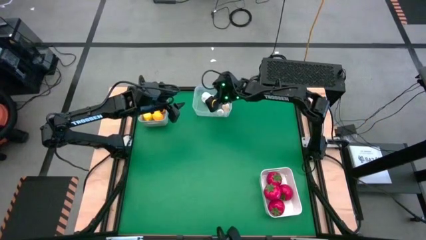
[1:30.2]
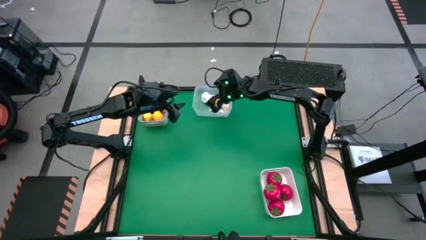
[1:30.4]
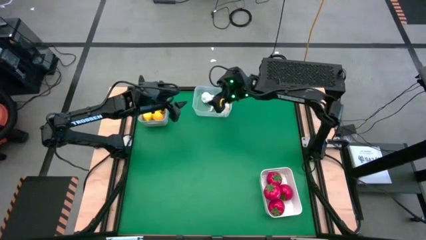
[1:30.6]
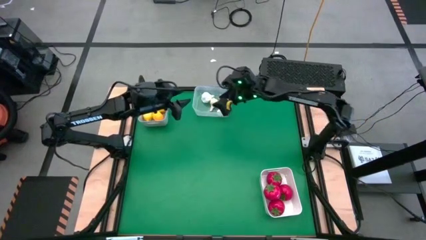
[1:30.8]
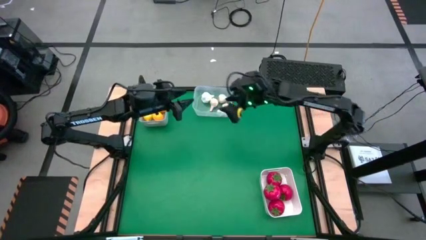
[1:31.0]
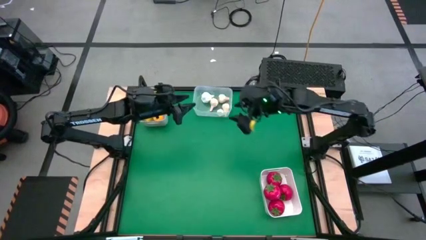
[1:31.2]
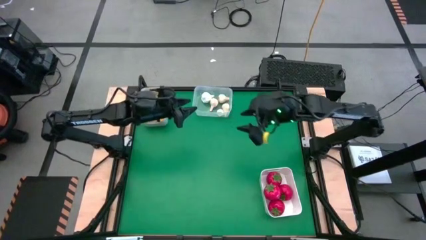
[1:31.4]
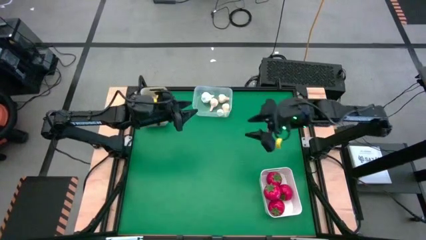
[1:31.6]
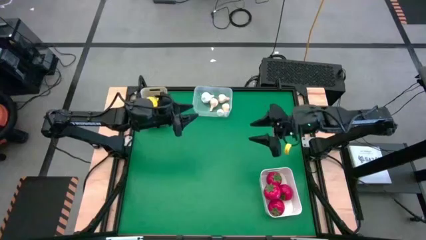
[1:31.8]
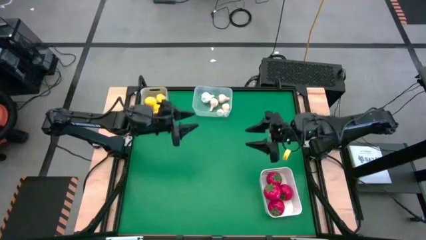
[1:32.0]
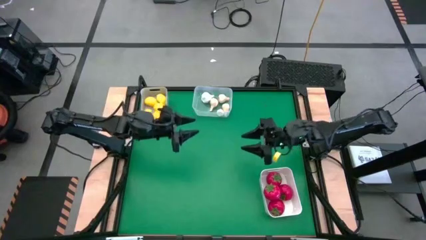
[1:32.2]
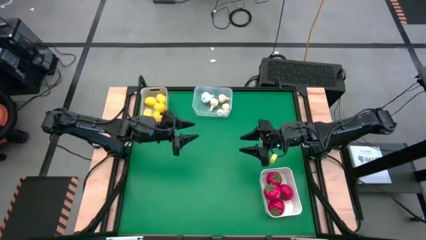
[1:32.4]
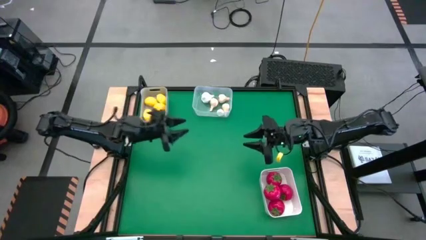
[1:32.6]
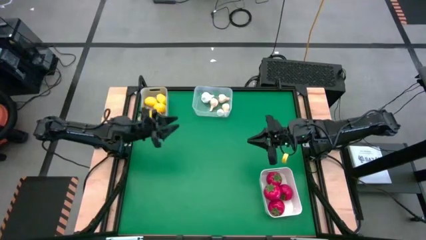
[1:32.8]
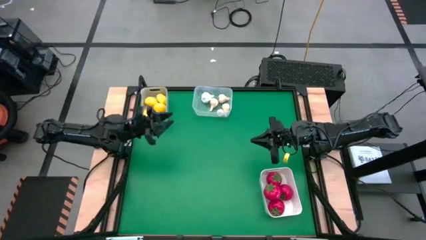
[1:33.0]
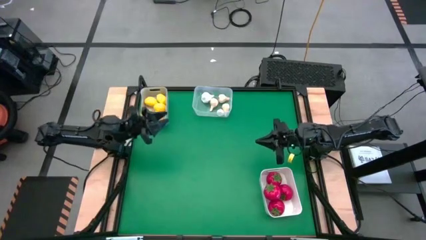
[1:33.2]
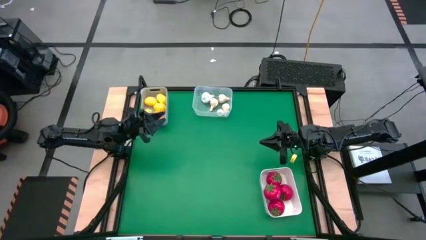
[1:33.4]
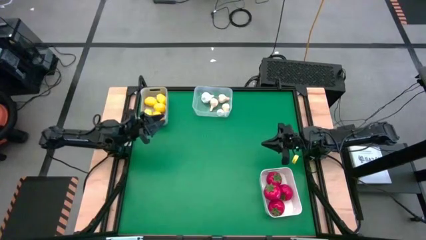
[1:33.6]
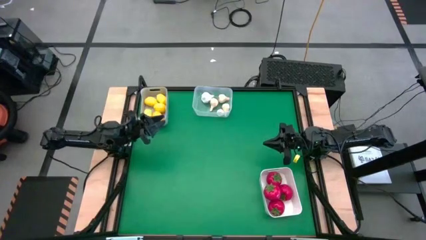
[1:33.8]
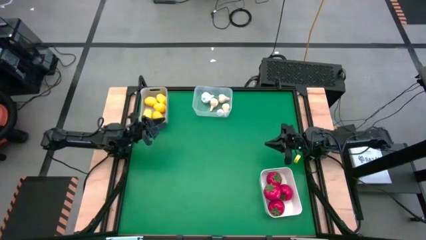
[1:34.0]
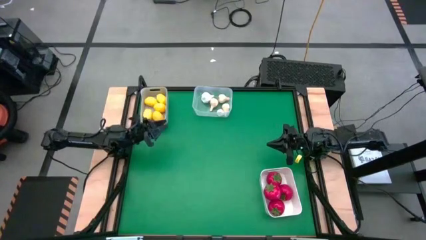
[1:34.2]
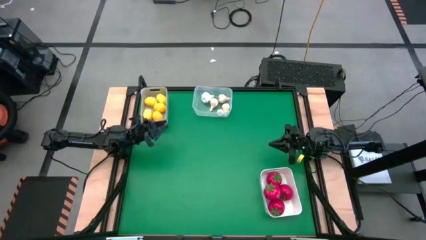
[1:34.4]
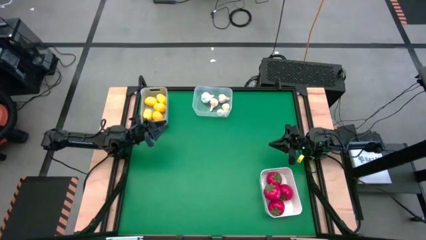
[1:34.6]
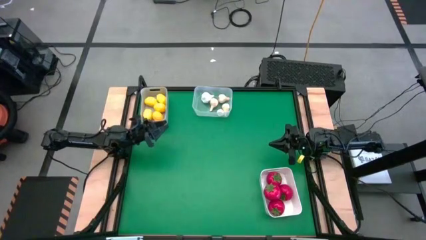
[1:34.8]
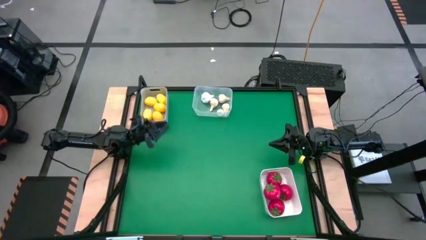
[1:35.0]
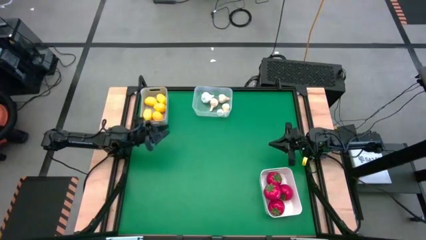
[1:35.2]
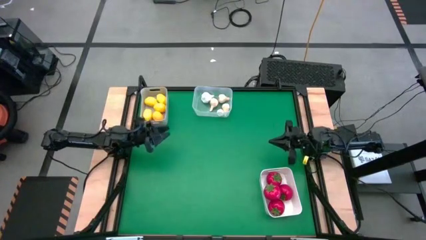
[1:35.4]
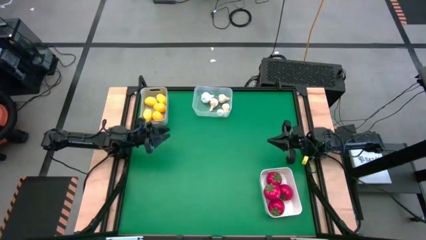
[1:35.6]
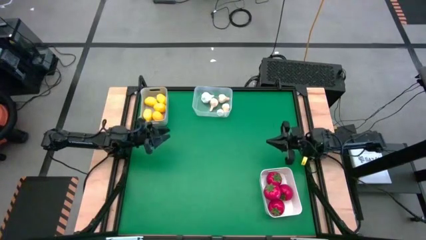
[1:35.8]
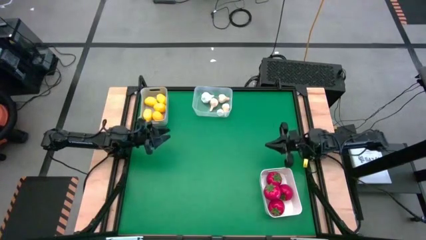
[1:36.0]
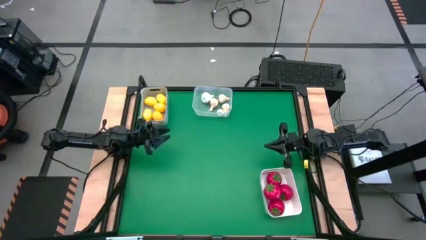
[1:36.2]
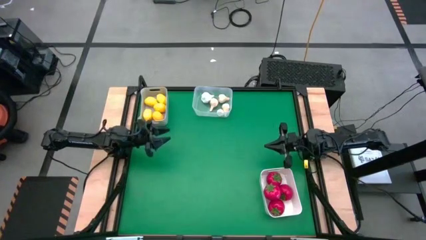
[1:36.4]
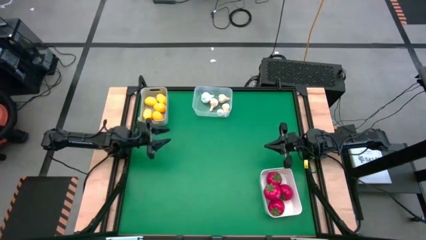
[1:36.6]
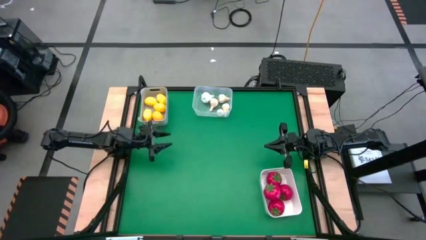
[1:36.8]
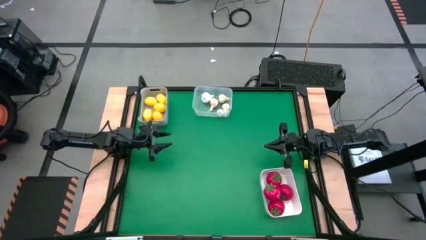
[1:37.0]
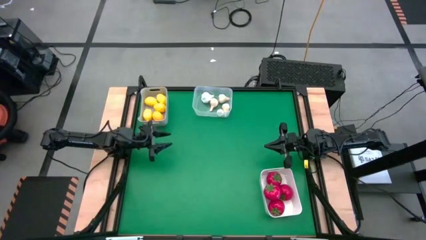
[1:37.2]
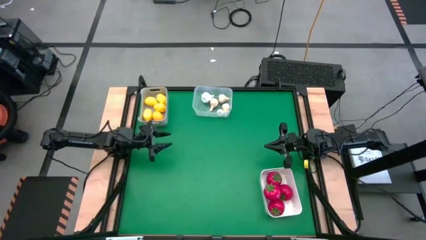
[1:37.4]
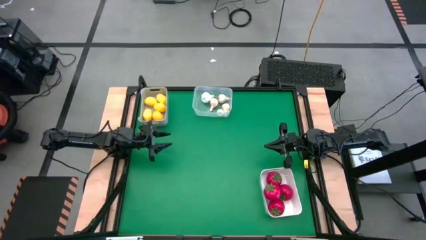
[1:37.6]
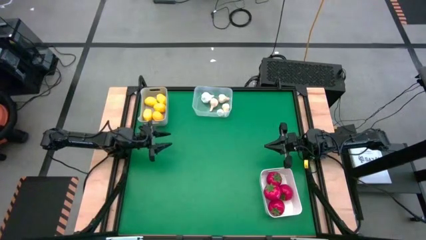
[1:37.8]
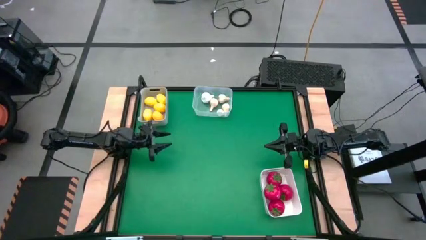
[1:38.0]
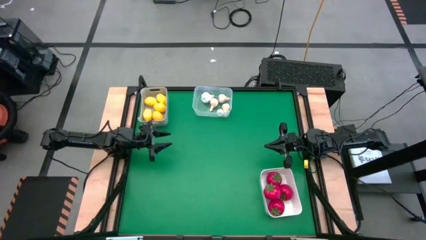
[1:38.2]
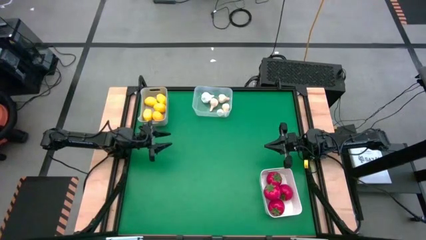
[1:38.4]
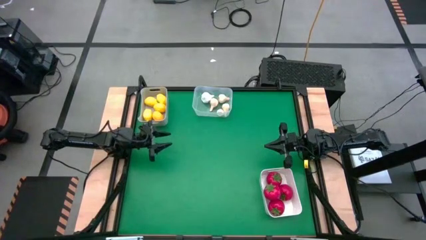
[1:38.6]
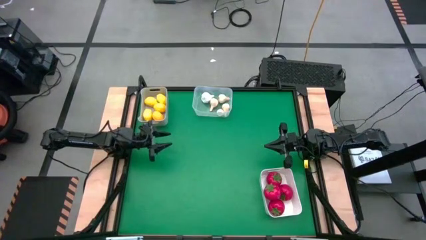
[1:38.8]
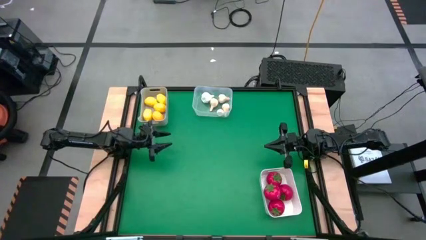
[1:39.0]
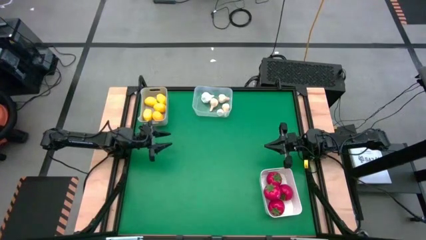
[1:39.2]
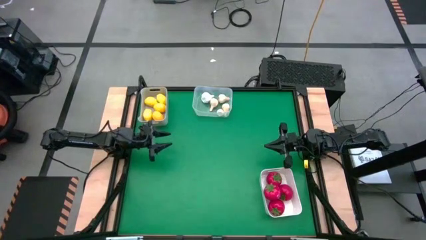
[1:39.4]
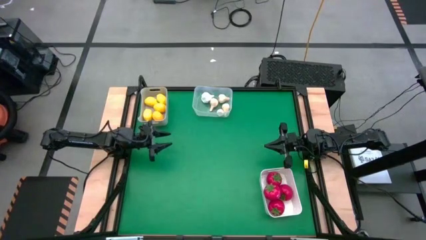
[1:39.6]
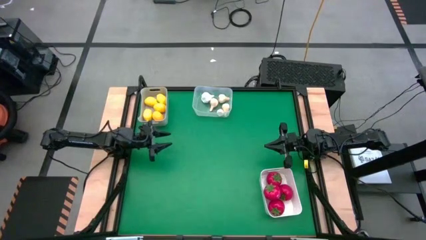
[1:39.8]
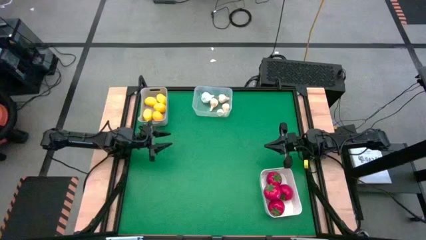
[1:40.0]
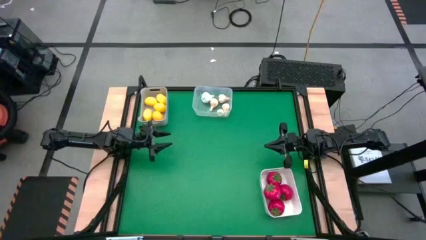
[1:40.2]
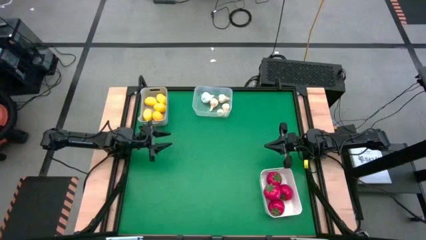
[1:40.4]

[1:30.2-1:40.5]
Task: Sort produce into baskets
Return to Home Position

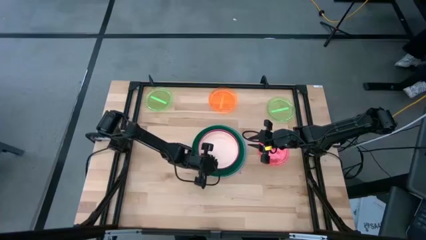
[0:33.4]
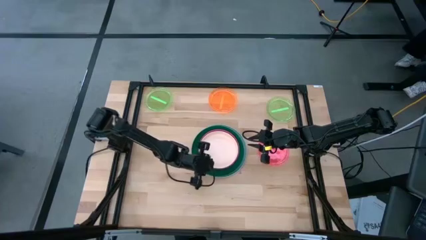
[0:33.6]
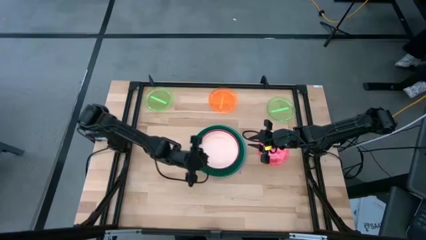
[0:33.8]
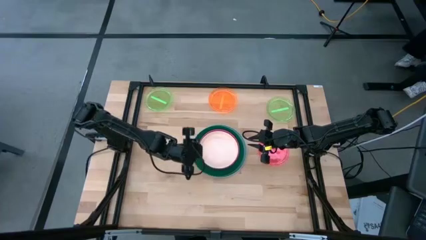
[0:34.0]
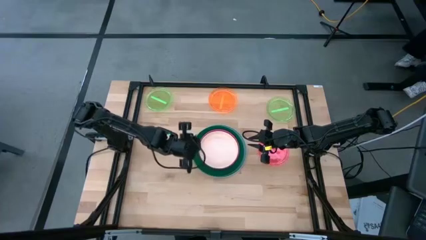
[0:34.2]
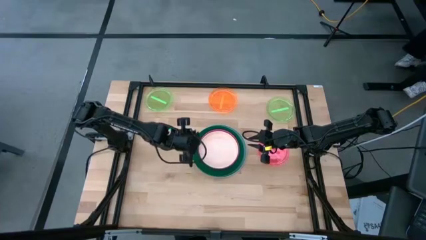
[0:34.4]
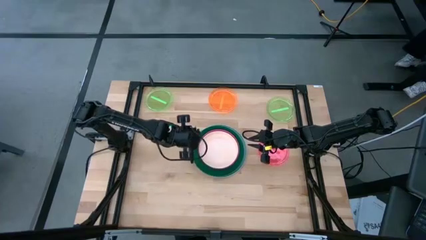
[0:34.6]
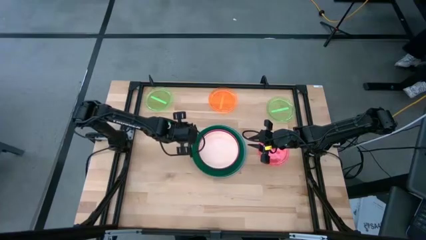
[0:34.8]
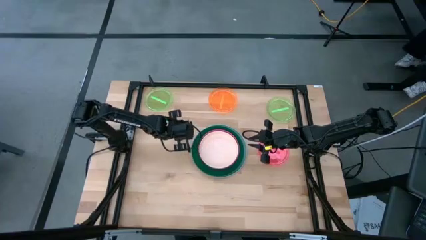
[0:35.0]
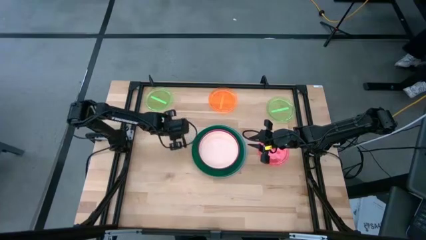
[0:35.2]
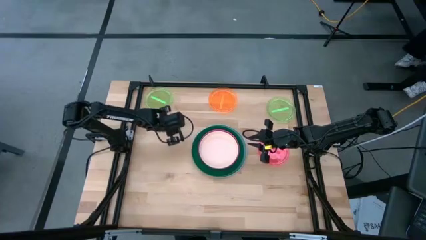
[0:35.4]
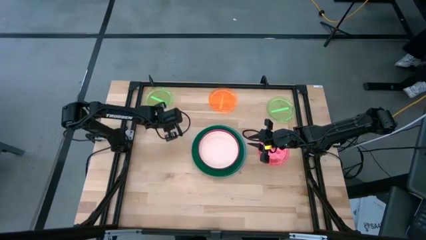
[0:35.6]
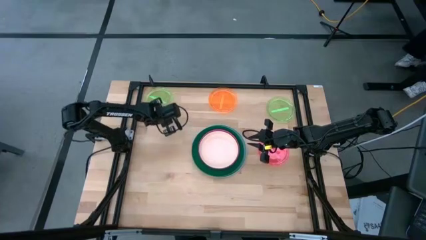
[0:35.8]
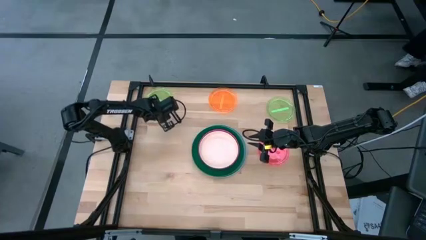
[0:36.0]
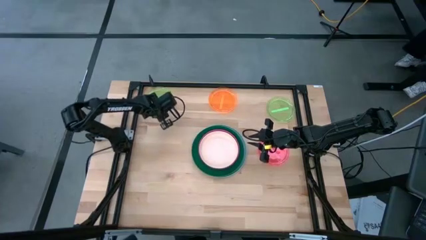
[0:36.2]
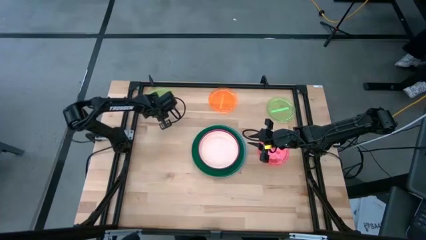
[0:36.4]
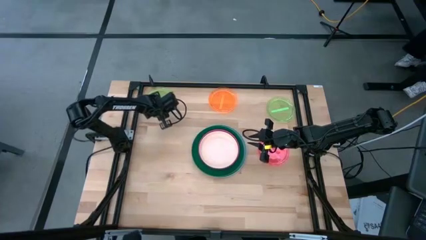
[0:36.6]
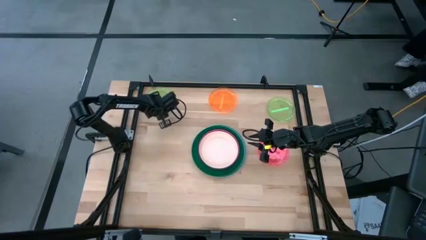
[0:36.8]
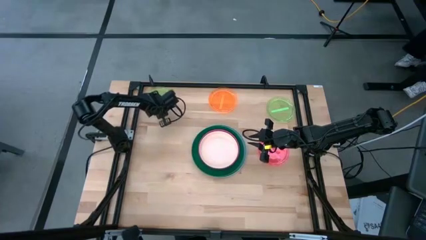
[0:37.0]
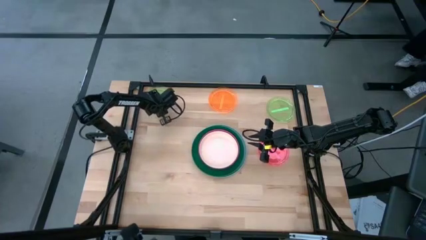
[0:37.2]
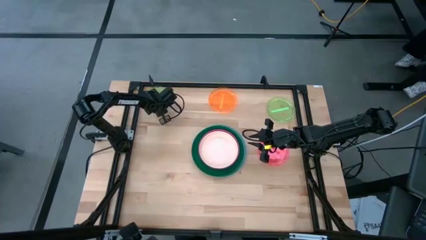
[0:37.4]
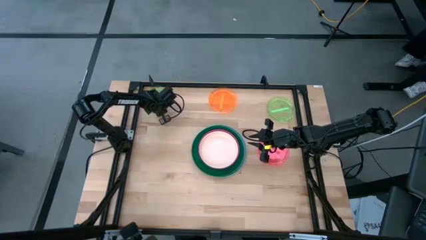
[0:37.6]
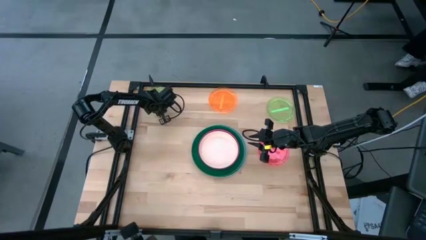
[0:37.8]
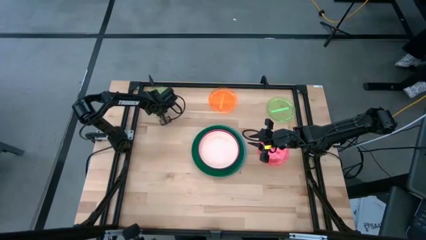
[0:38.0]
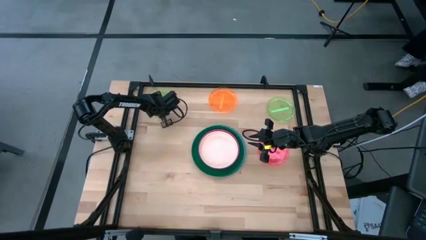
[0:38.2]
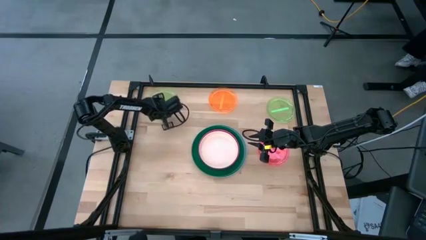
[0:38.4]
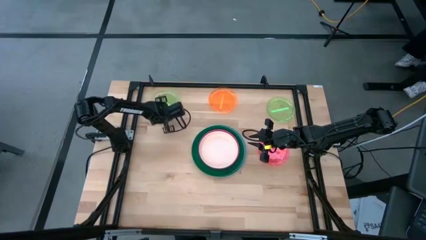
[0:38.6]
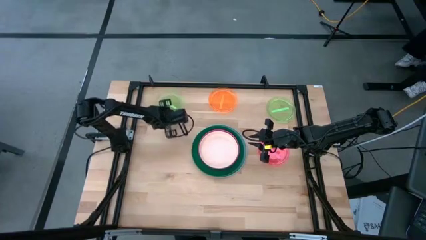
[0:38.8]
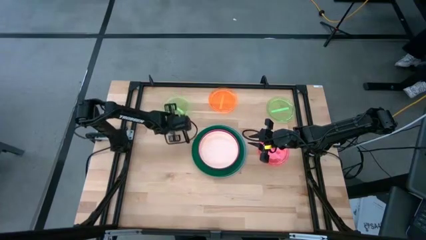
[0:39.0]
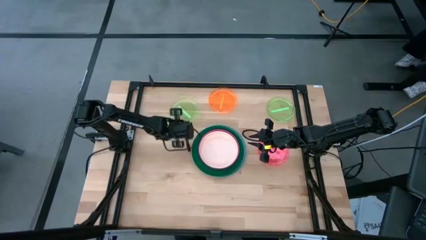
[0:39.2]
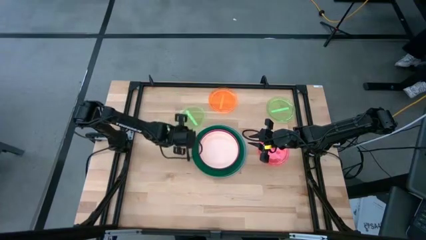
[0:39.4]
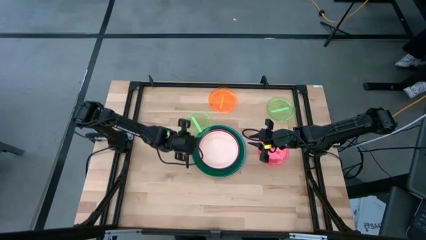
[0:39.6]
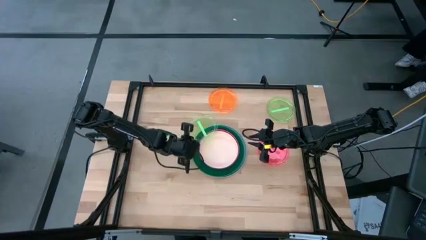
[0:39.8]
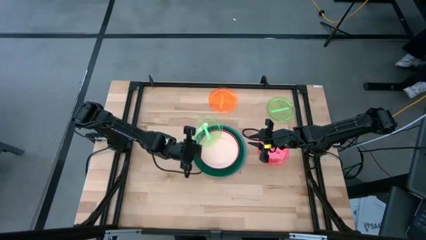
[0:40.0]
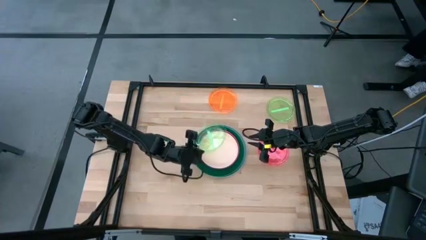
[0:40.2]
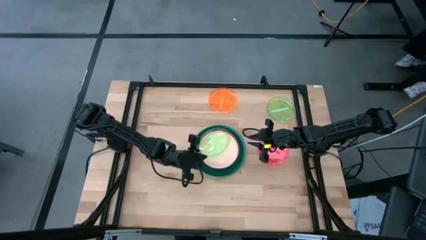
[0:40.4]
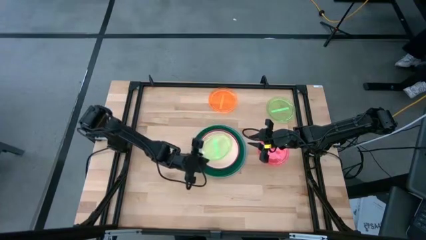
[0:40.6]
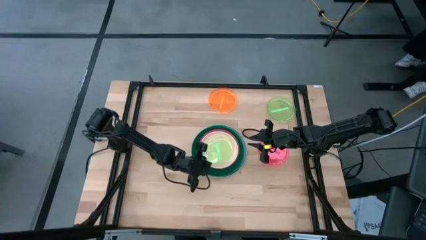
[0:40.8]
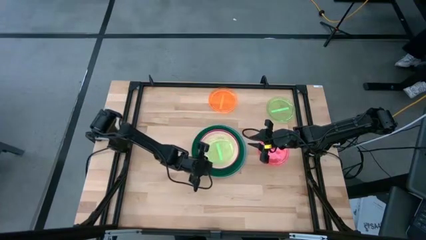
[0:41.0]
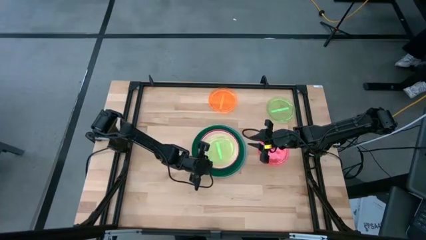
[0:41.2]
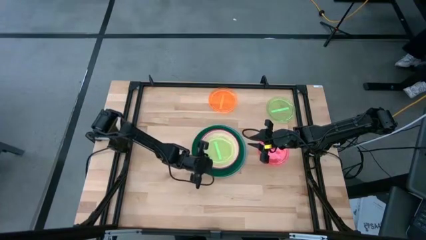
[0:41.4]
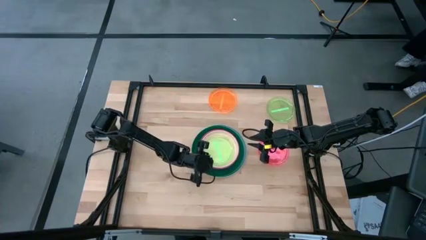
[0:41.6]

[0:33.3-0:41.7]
Task: Stack plastic plates
Stack the left light green plate on top of the light pink plate
